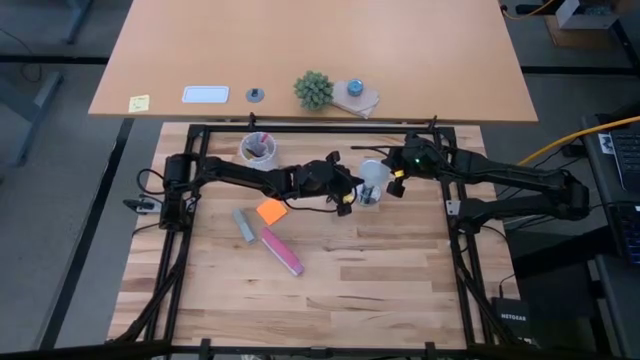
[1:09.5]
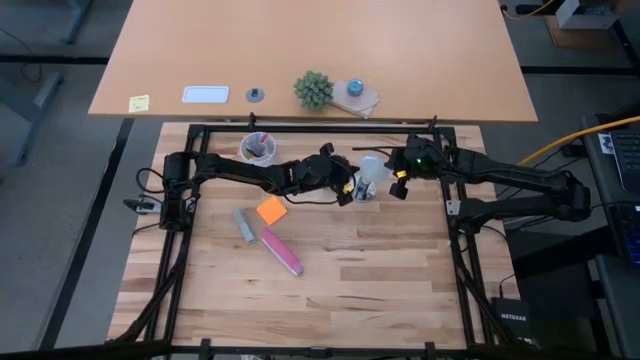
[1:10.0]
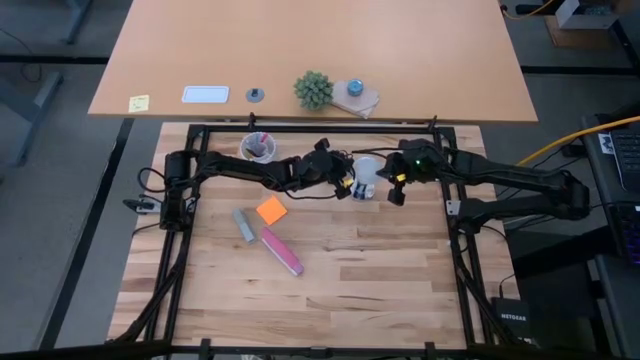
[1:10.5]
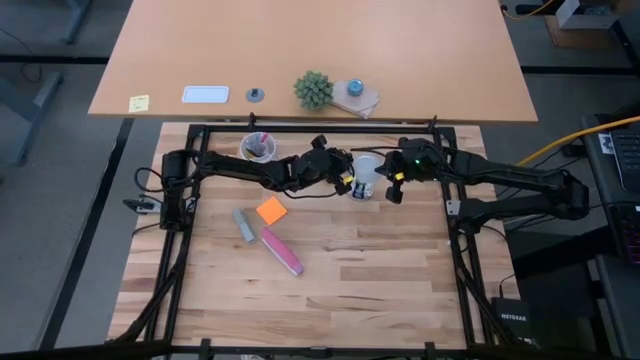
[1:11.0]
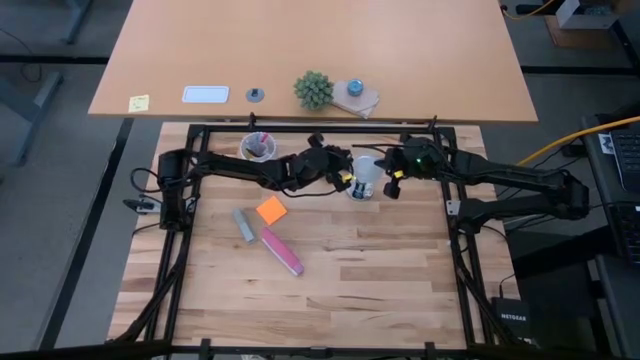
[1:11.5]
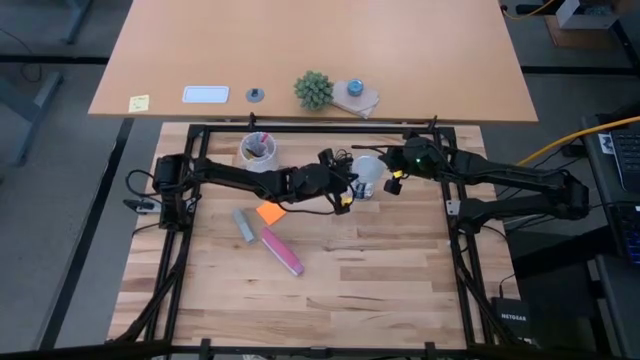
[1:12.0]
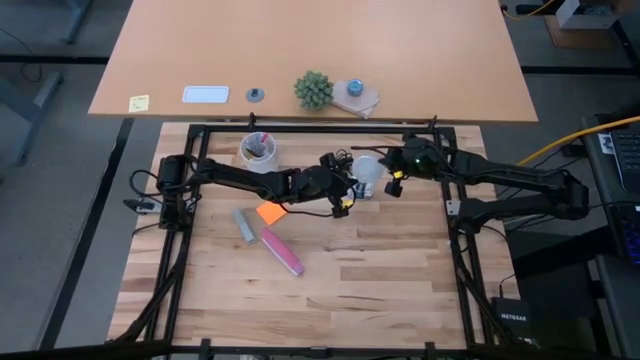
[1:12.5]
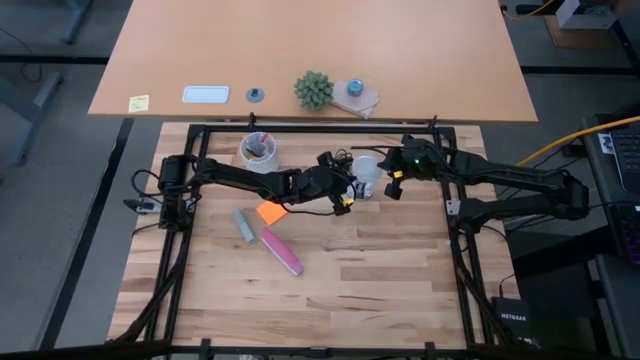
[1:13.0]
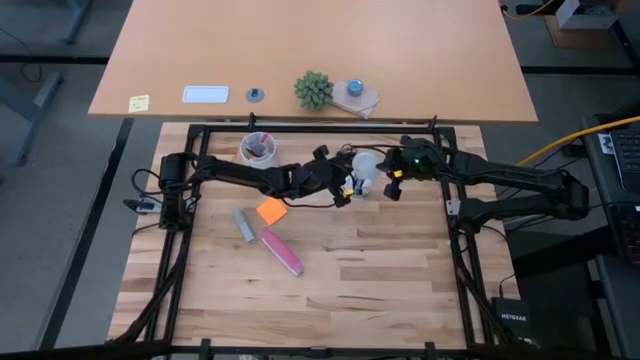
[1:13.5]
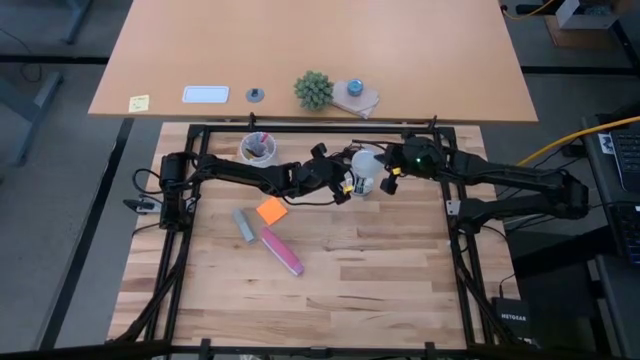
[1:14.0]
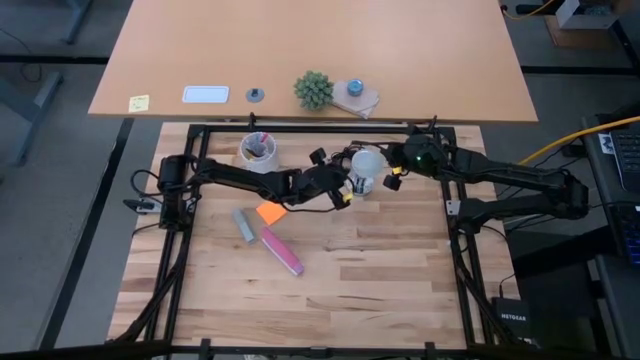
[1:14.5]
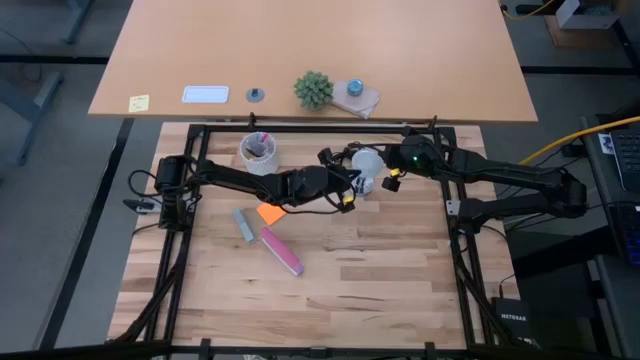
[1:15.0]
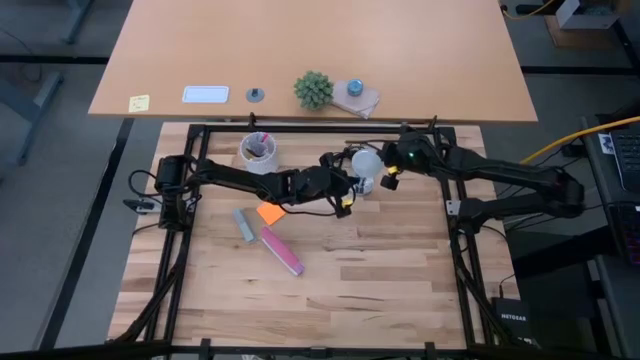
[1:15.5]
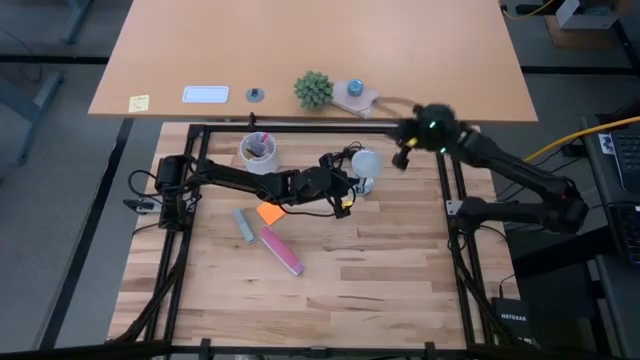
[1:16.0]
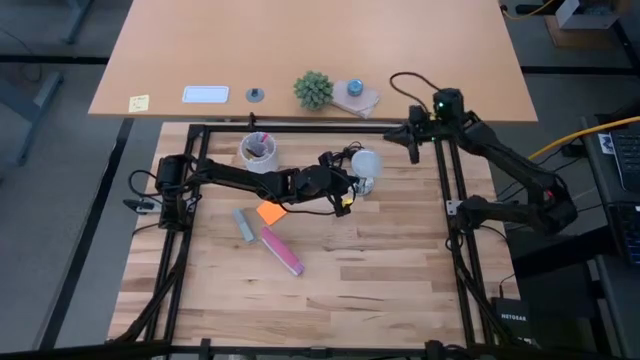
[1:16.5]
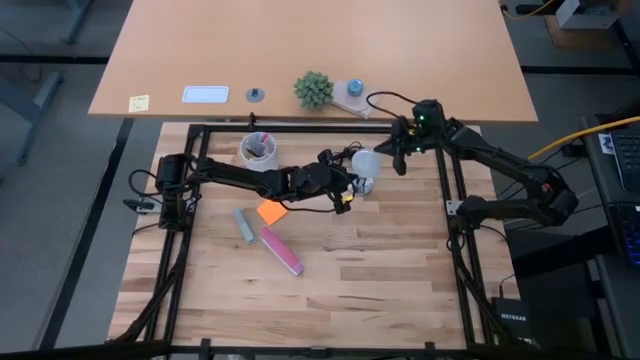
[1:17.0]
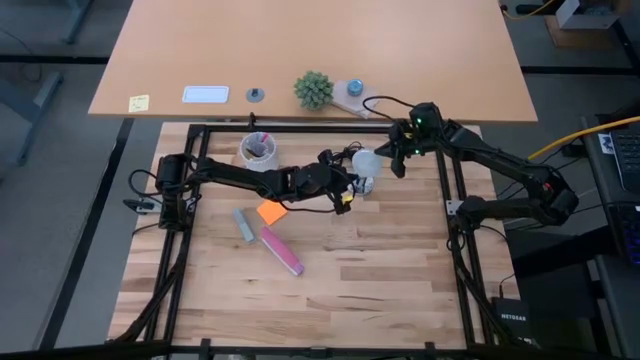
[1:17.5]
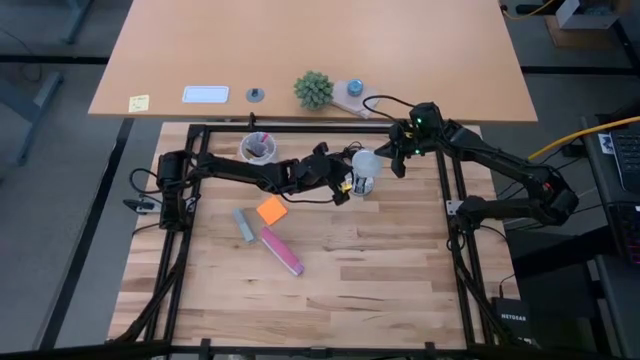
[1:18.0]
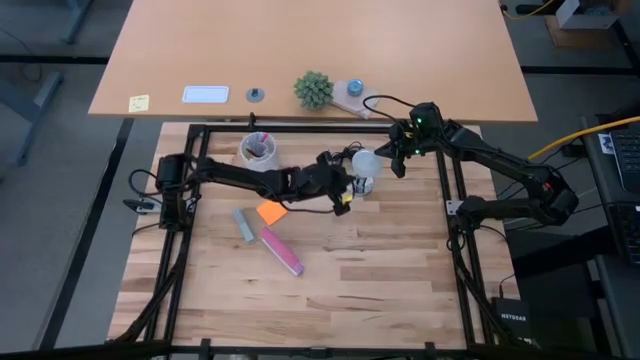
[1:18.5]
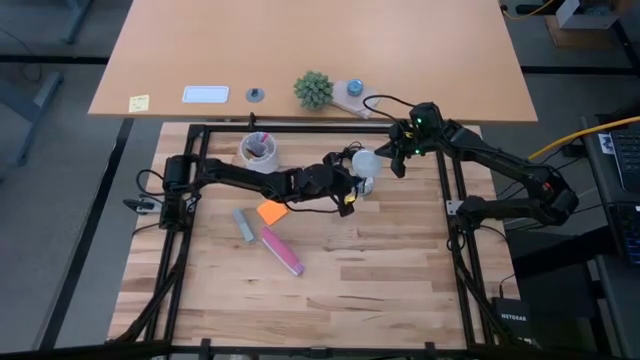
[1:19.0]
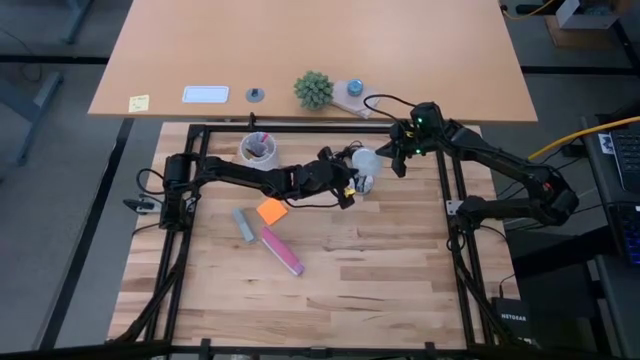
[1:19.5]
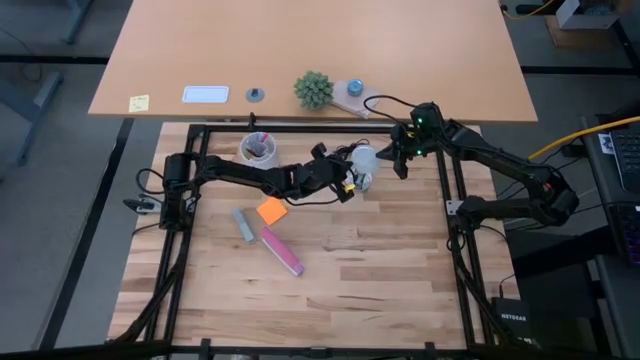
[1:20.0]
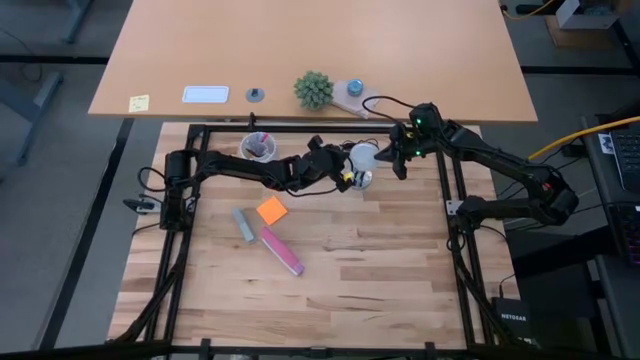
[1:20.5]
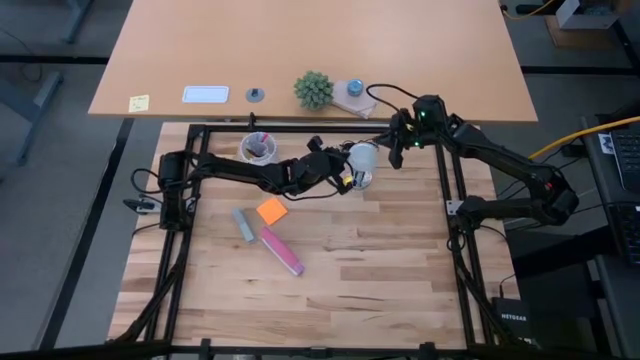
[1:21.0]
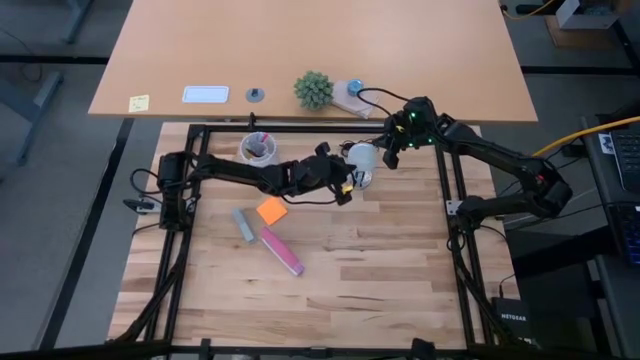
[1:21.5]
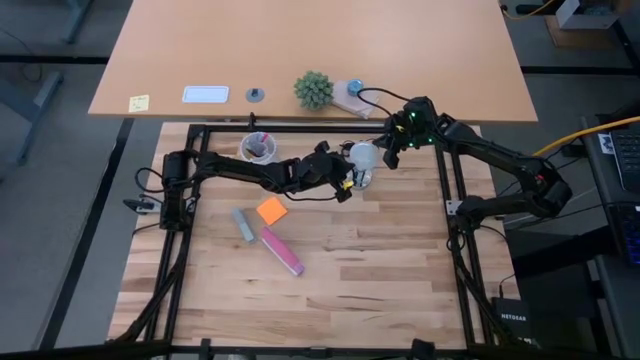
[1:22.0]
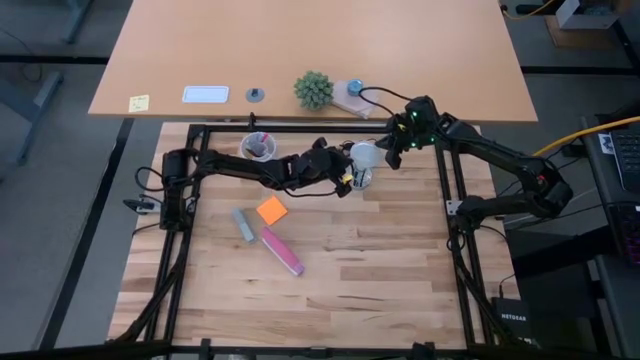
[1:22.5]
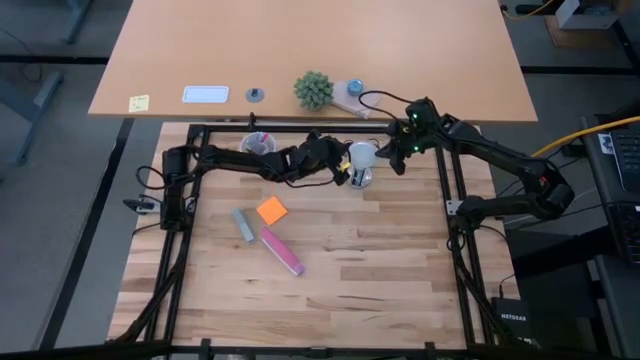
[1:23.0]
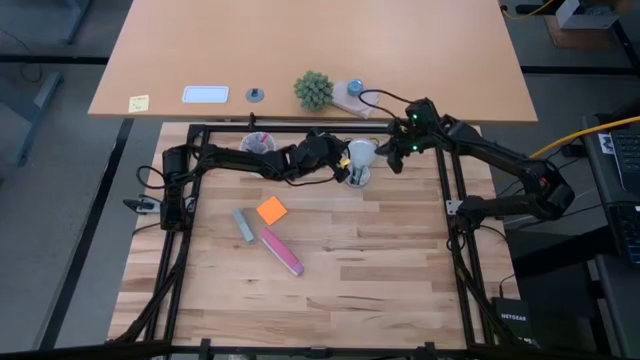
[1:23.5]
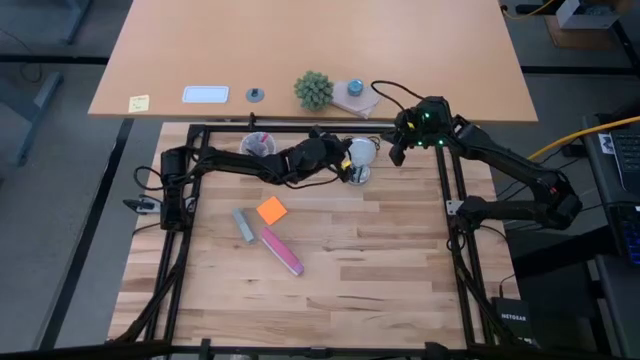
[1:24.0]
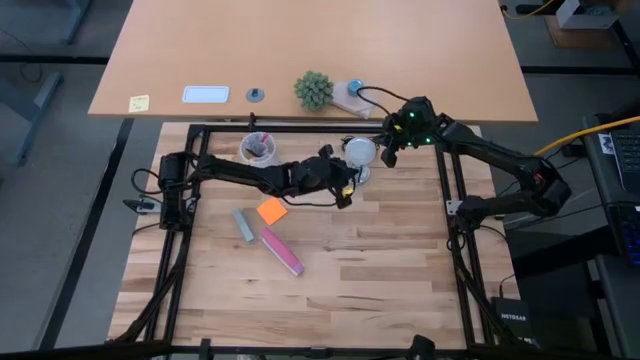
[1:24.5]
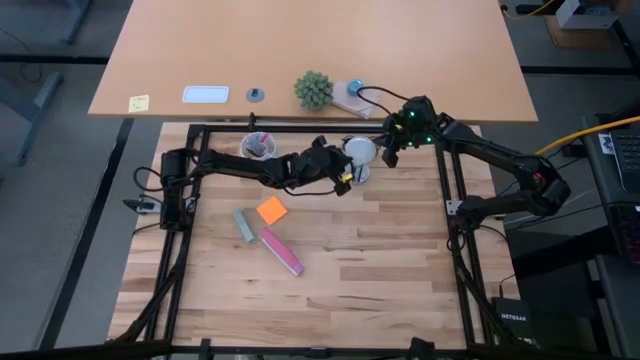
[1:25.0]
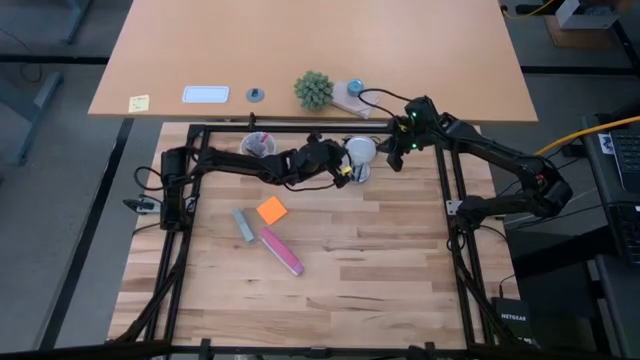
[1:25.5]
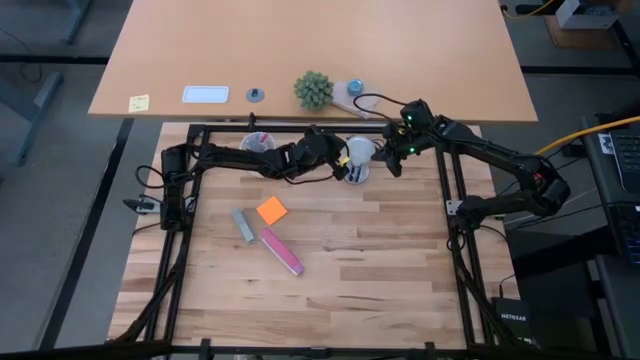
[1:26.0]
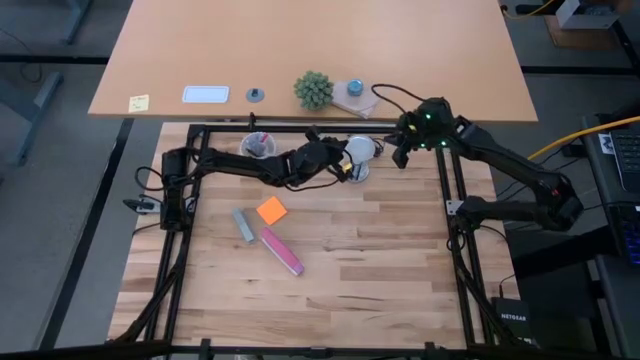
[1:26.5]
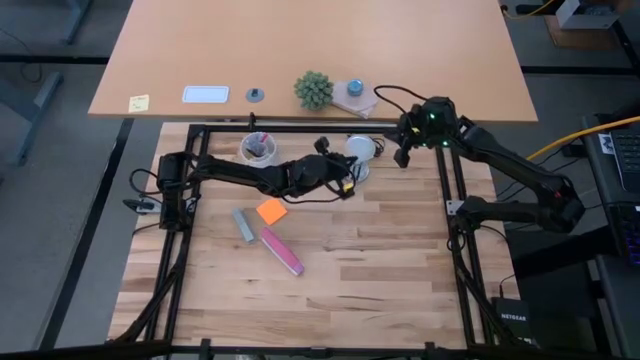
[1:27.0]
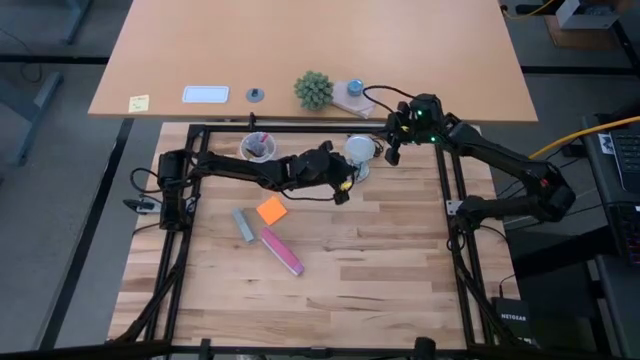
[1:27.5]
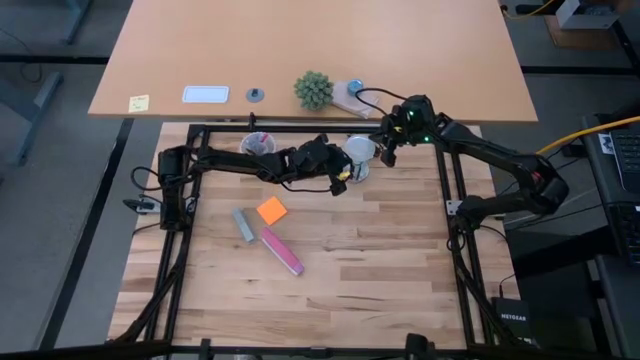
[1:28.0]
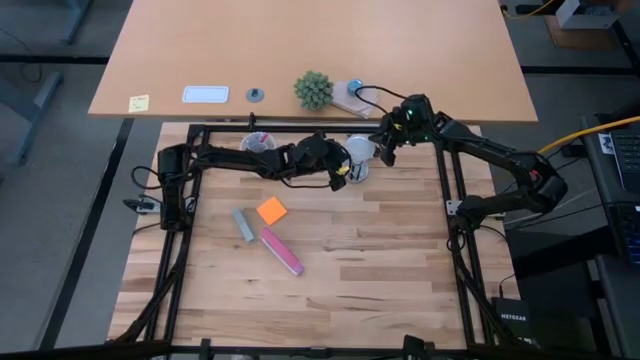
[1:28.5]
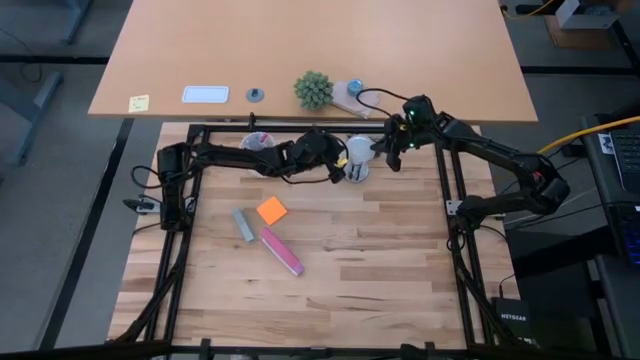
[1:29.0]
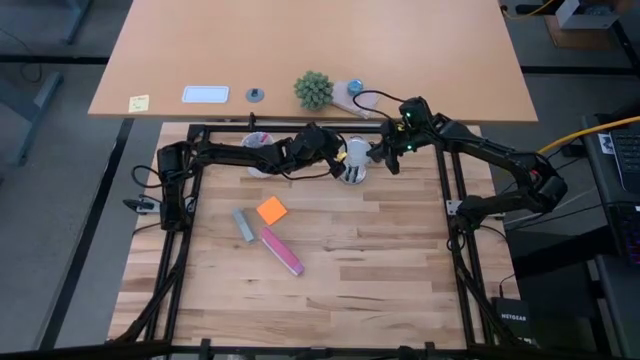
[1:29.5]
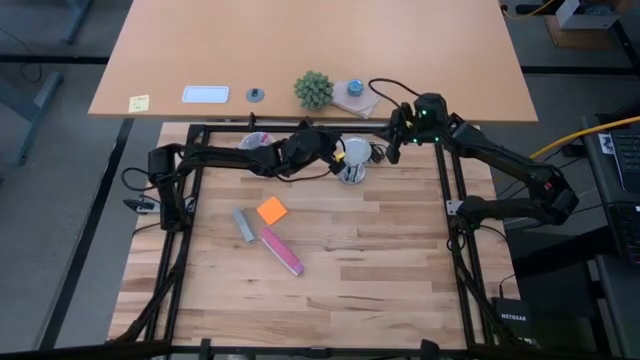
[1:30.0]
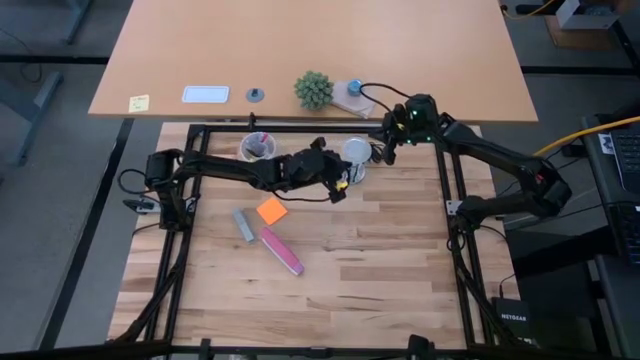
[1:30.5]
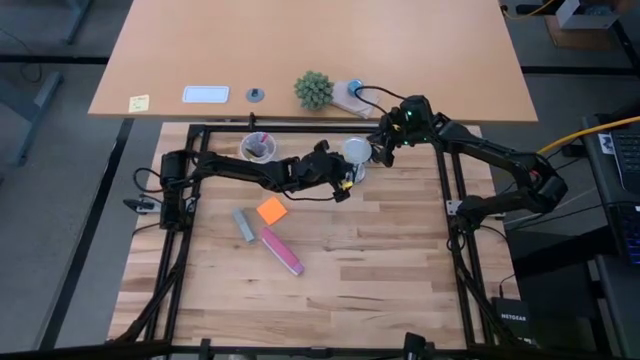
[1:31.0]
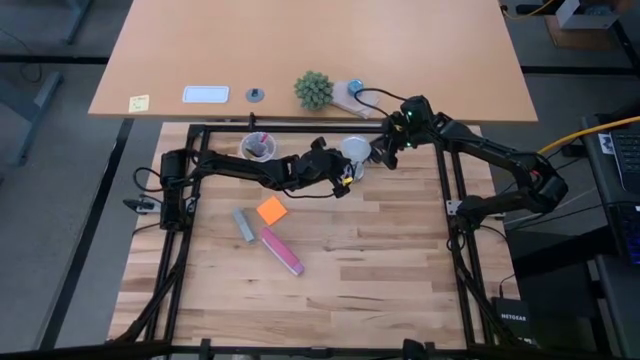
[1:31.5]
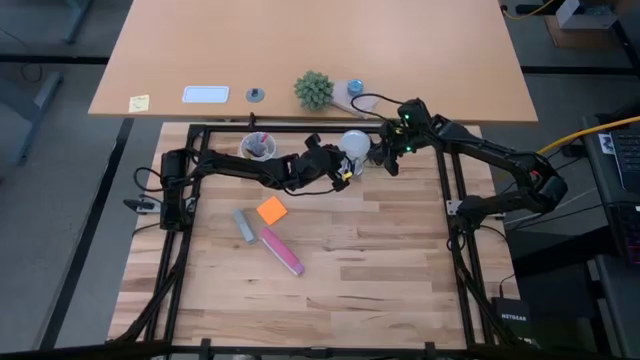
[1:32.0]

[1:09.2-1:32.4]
Task: Screw lightbulb
Insert the lightbulb into the lamp
